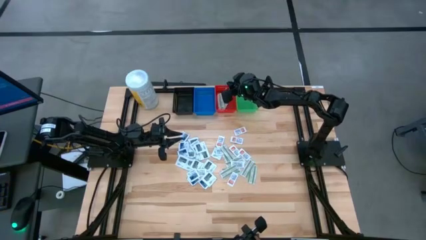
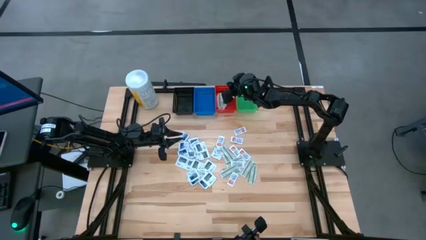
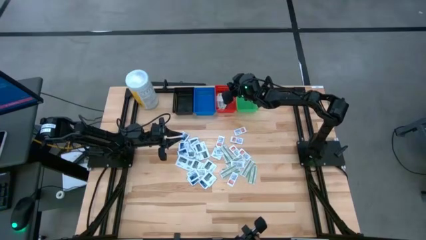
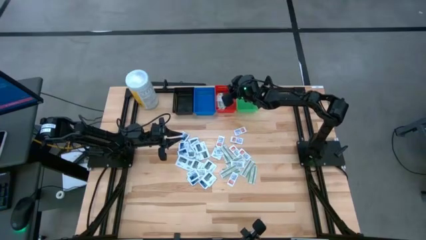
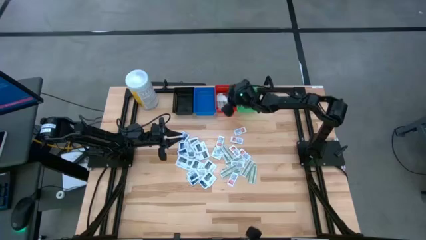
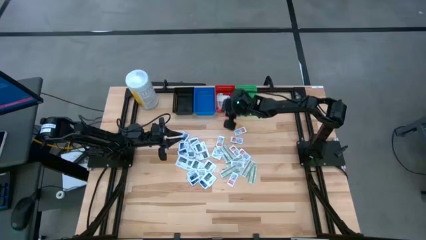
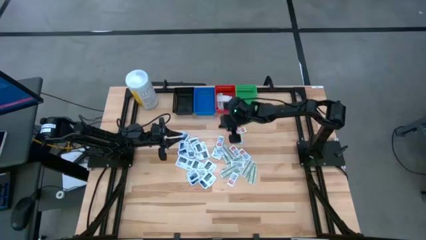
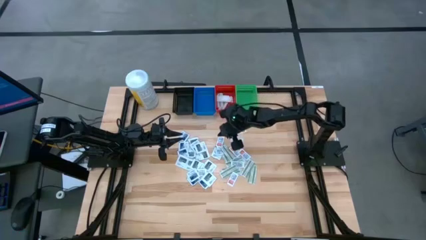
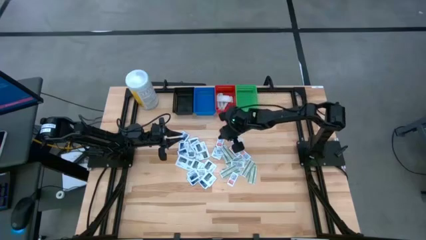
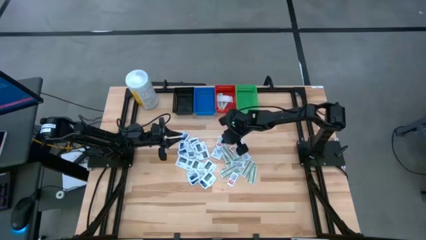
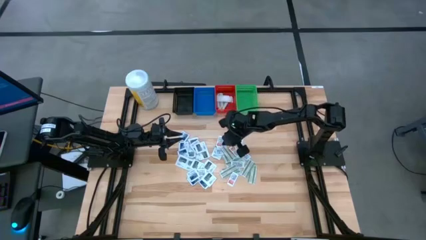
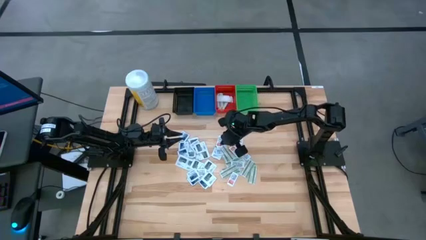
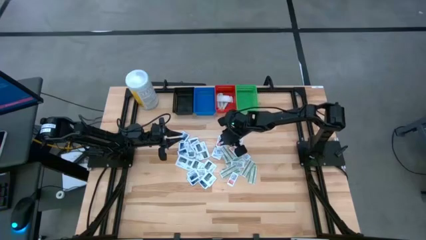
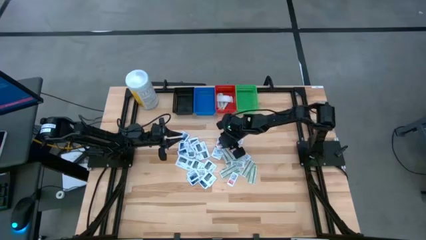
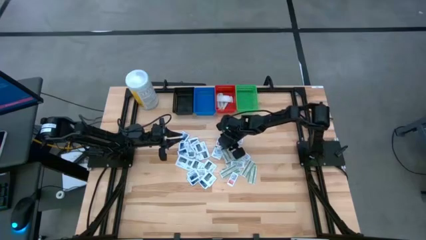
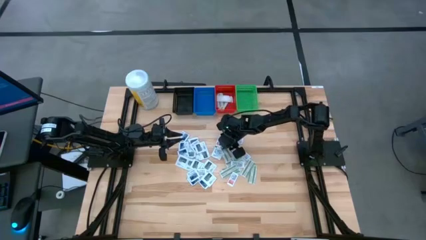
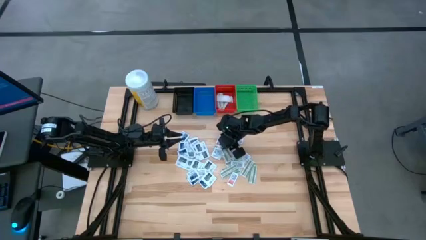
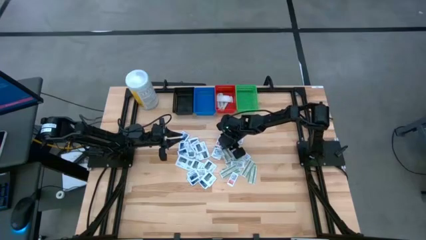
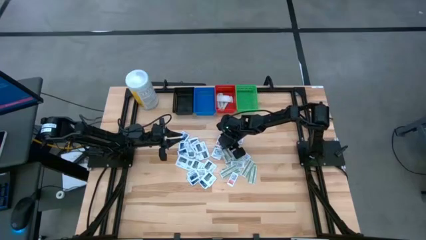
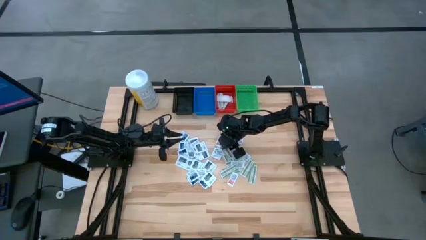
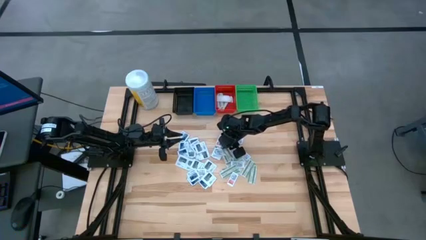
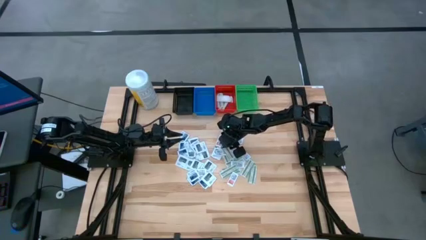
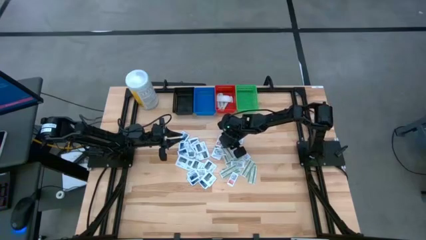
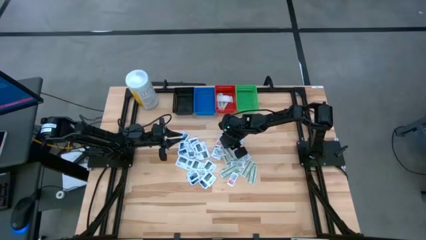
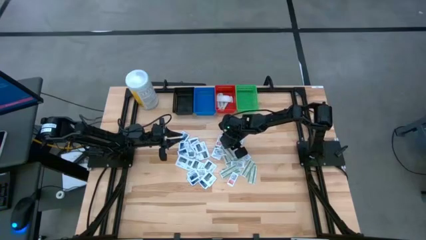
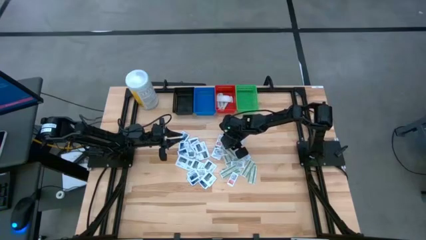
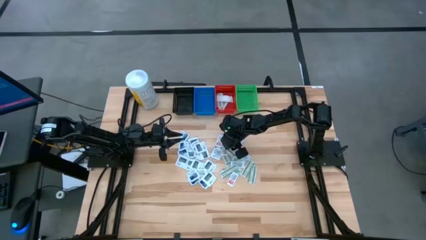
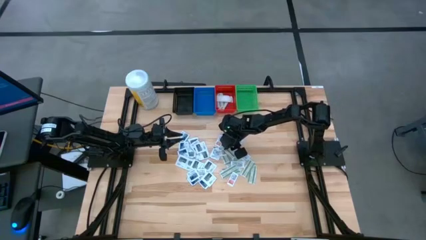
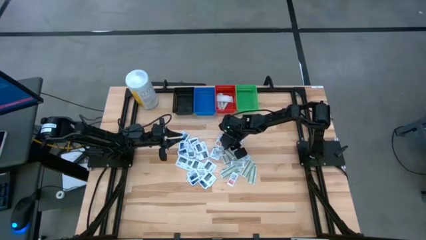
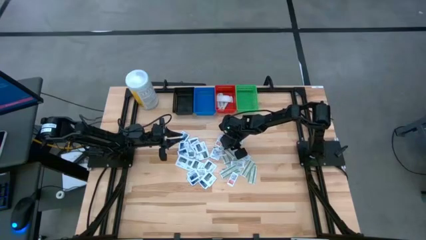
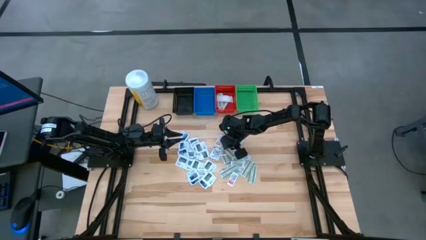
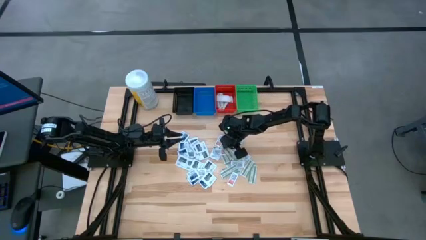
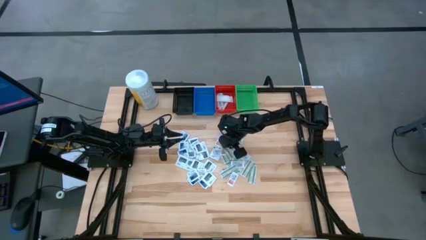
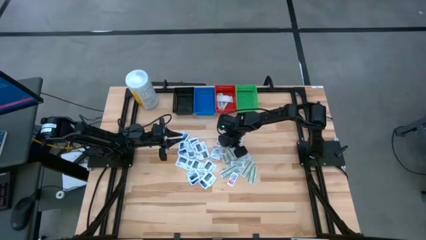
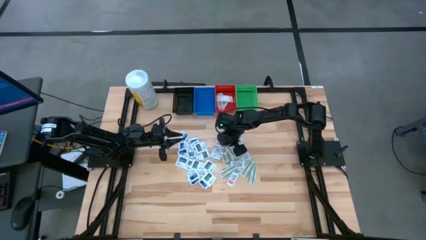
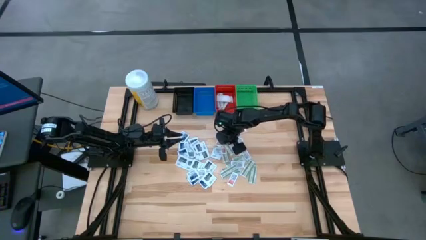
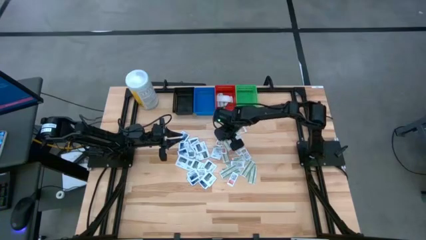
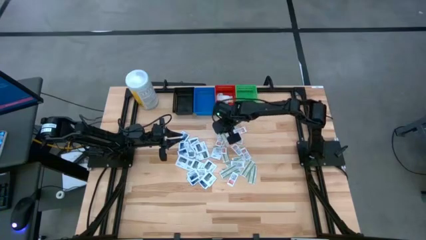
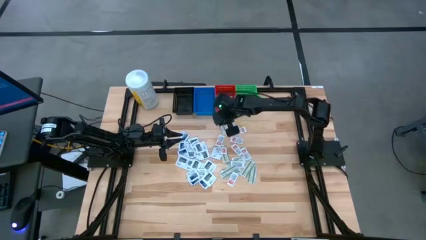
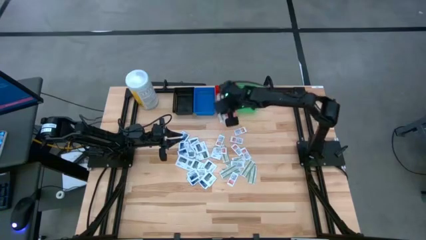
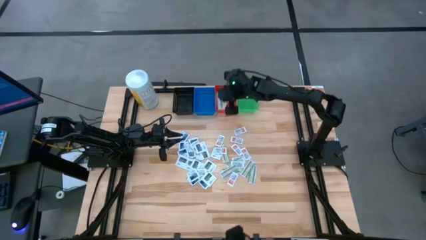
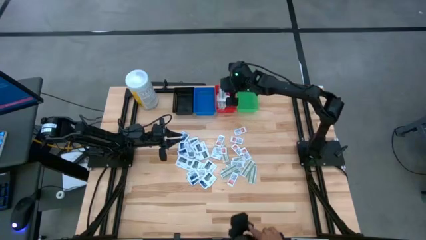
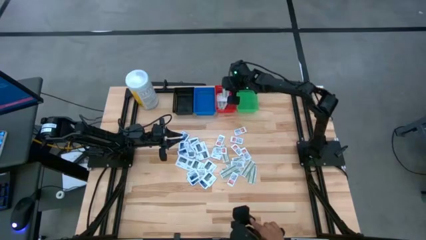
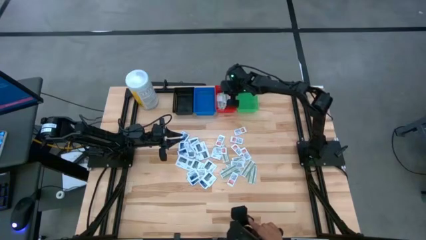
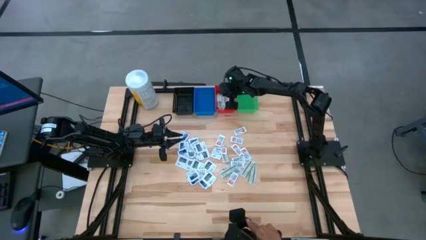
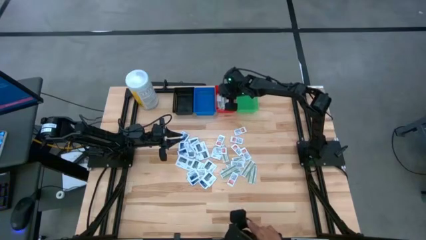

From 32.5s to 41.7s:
Task: Pick & Place First Aid Supplies
Put the green bandage pack into the red bin

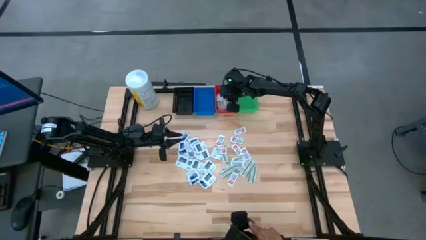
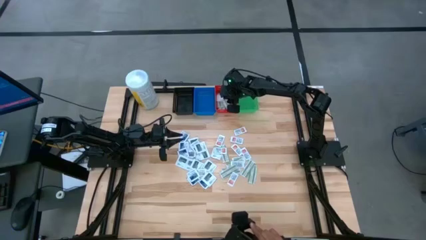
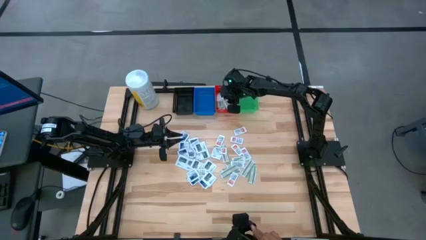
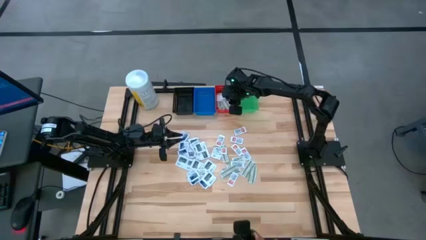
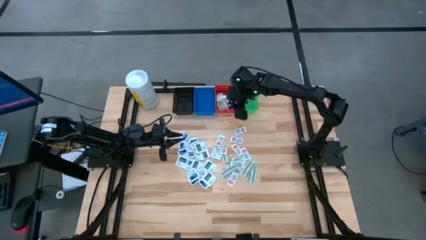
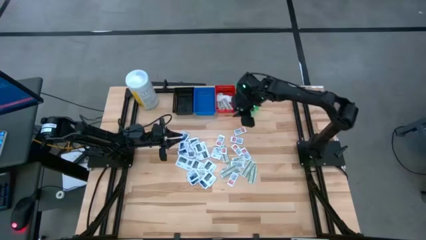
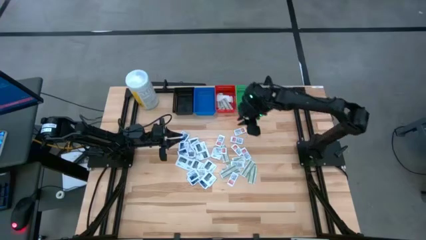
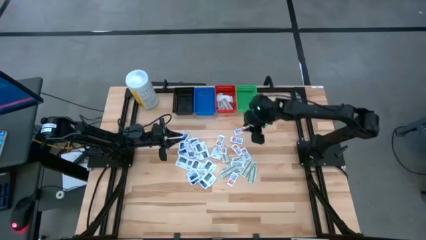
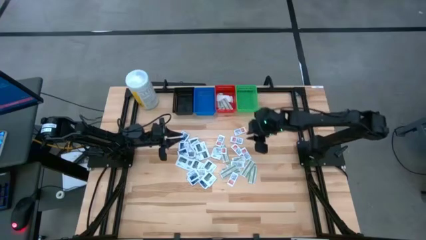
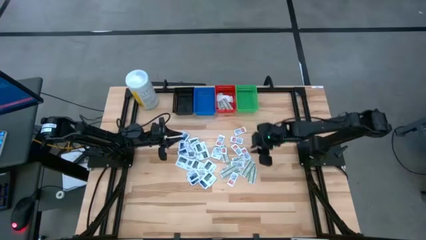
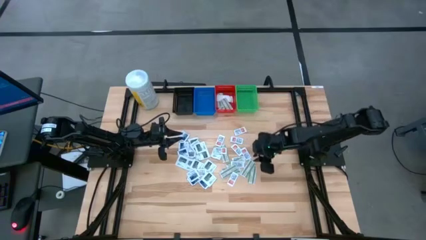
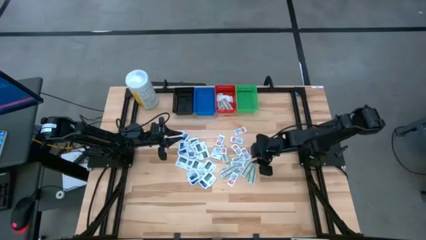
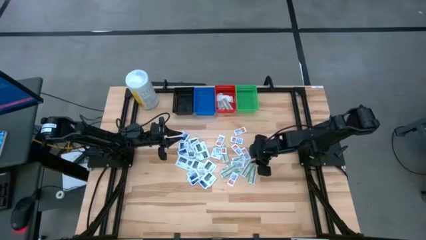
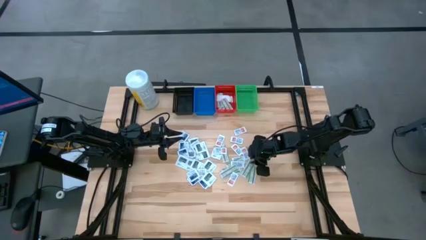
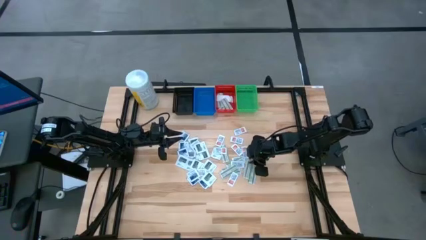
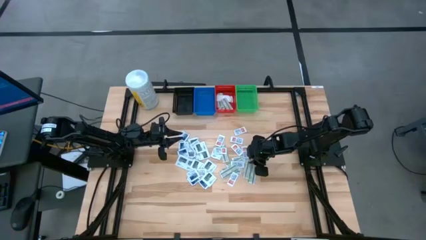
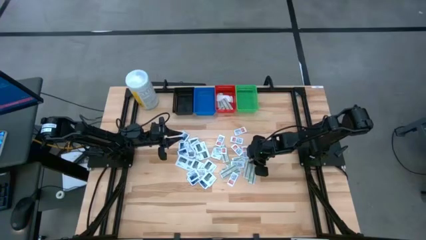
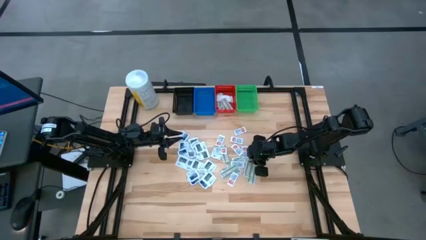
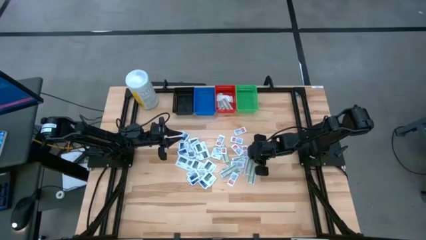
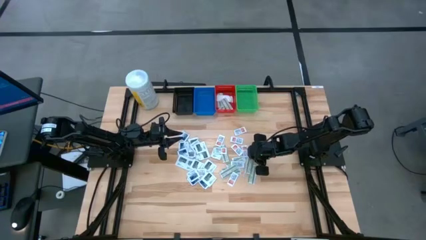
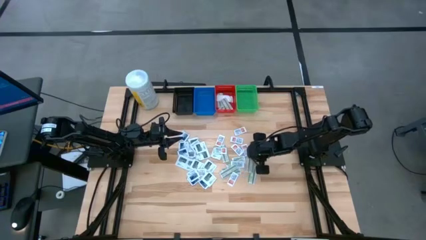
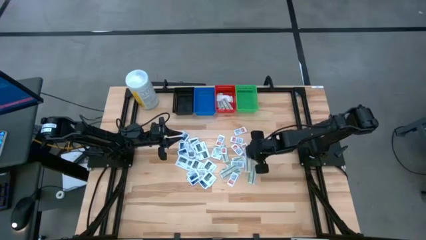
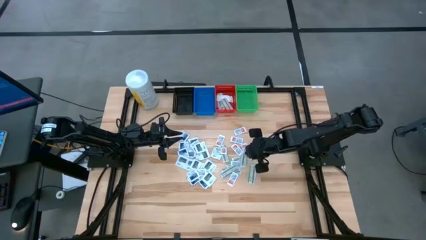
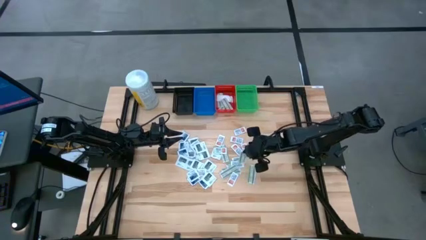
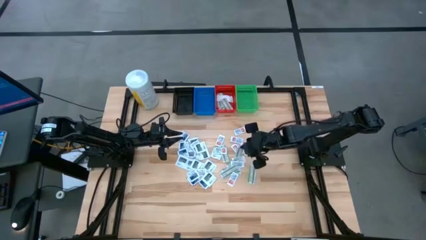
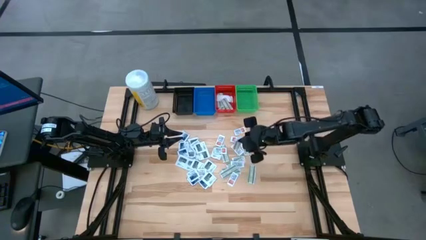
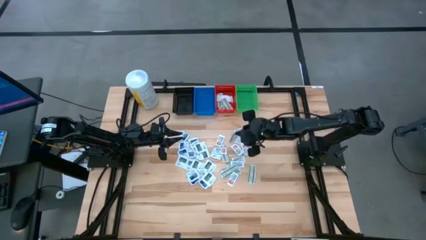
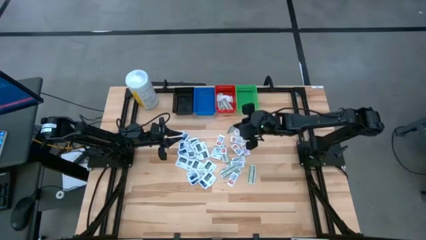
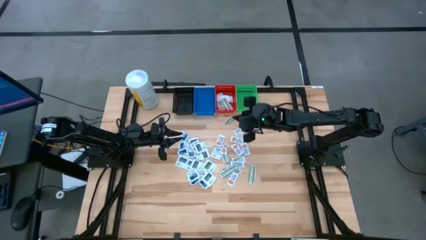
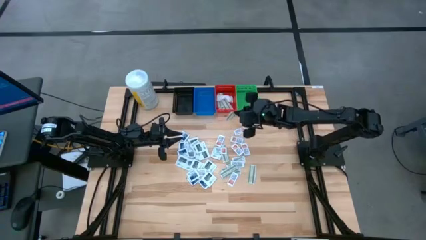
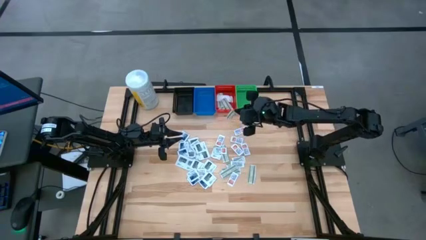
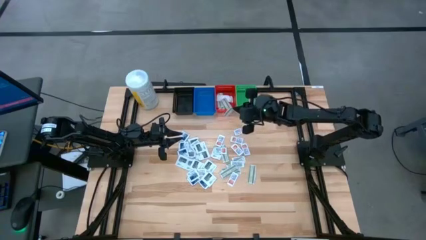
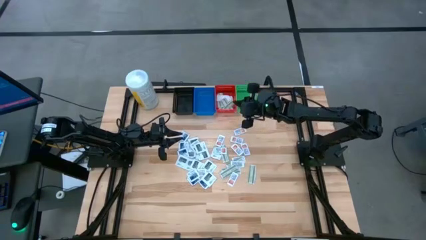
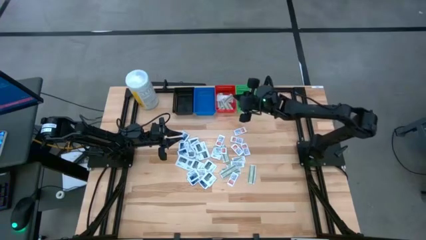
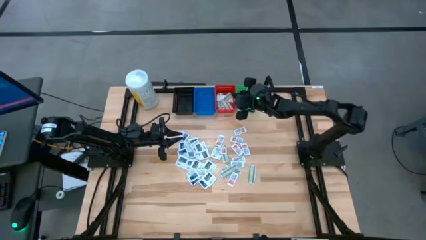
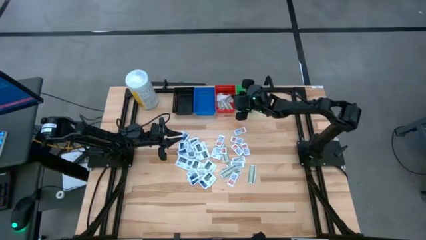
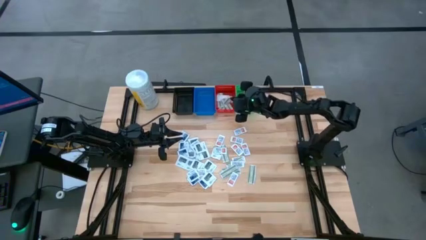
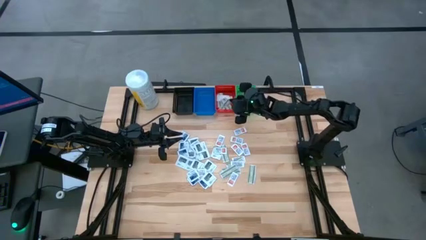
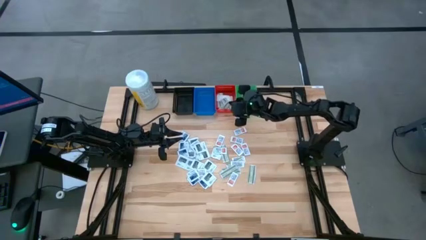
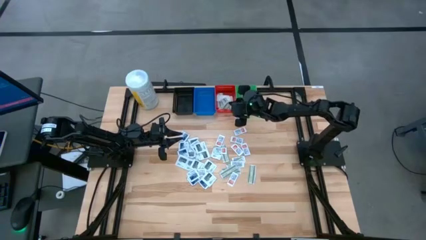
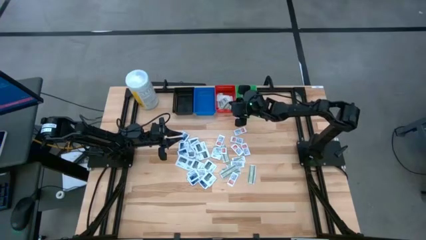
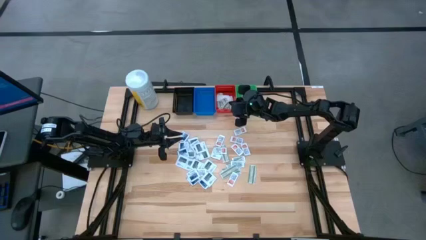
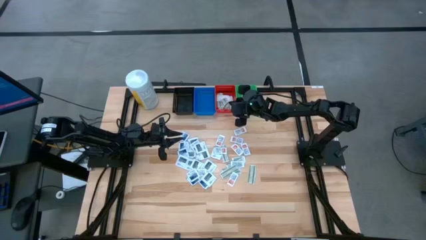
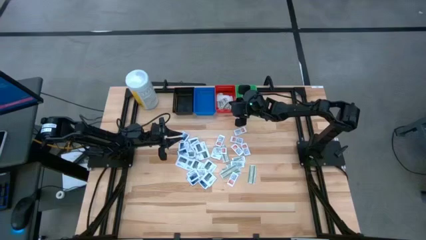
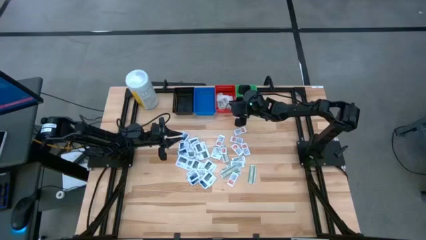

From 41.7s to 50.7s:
Put the green bandage pack into the red bin
